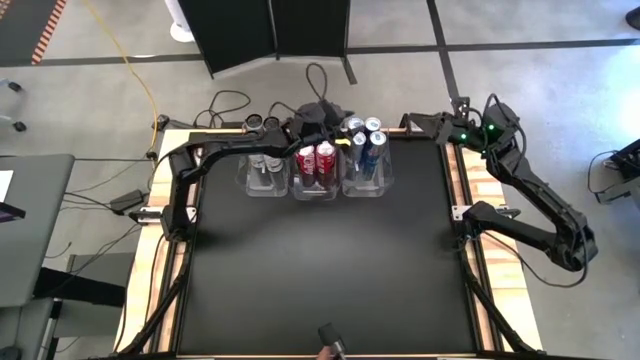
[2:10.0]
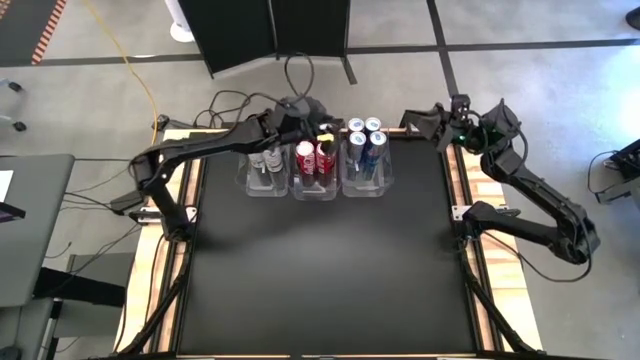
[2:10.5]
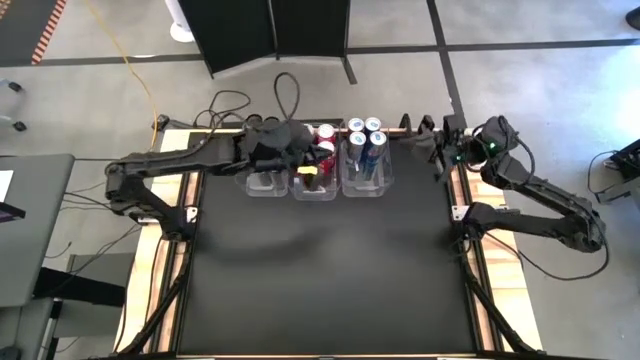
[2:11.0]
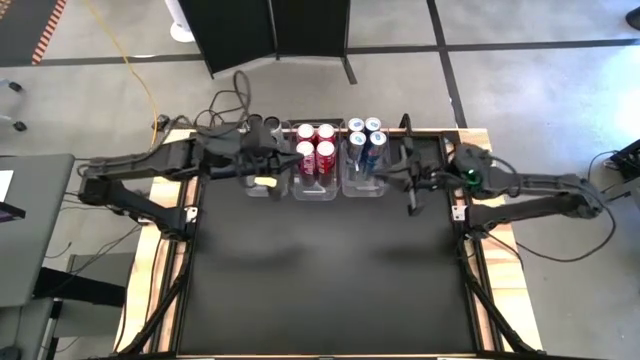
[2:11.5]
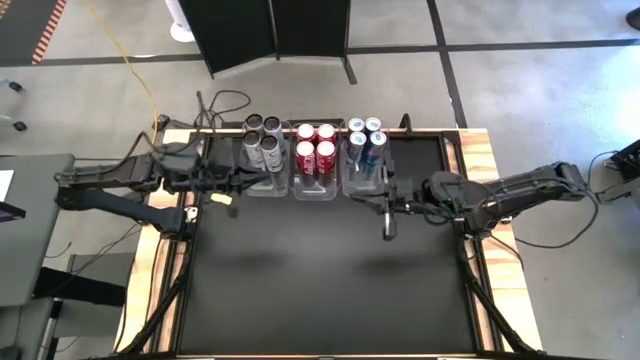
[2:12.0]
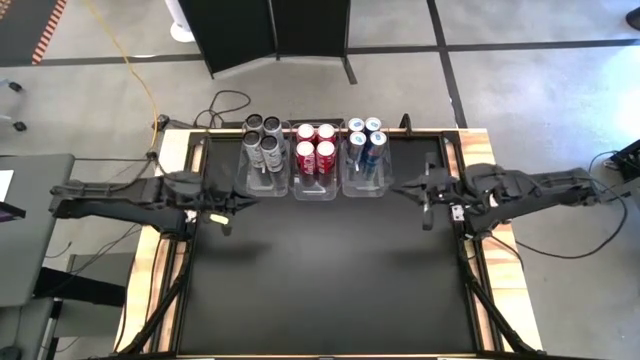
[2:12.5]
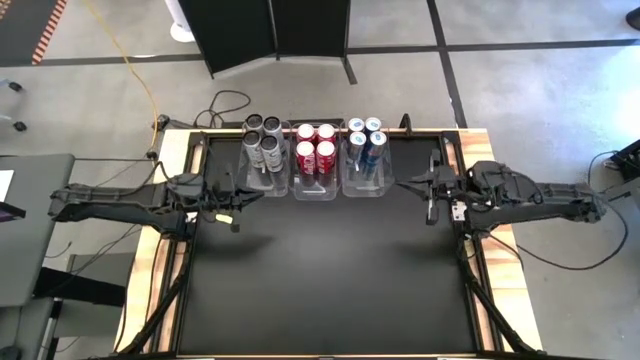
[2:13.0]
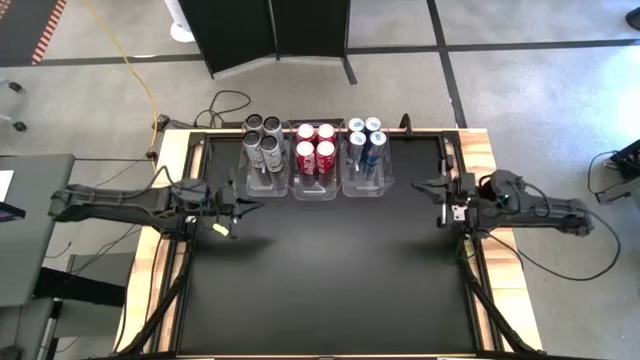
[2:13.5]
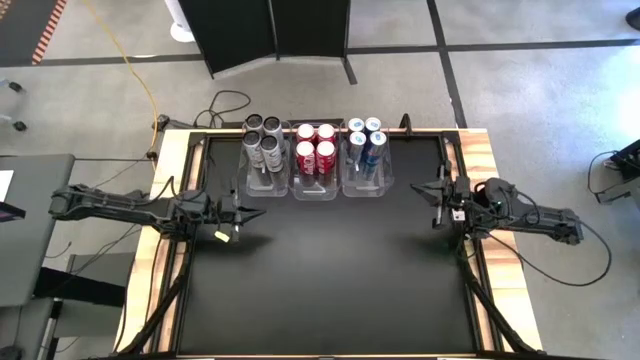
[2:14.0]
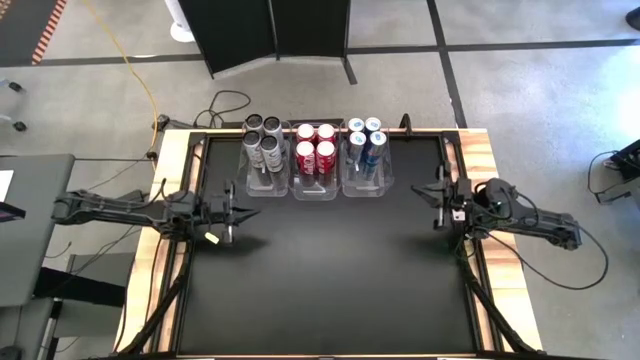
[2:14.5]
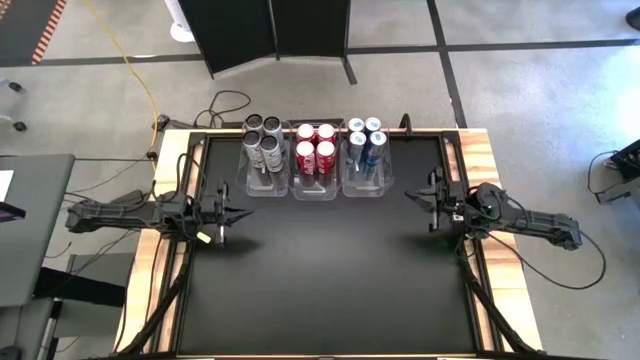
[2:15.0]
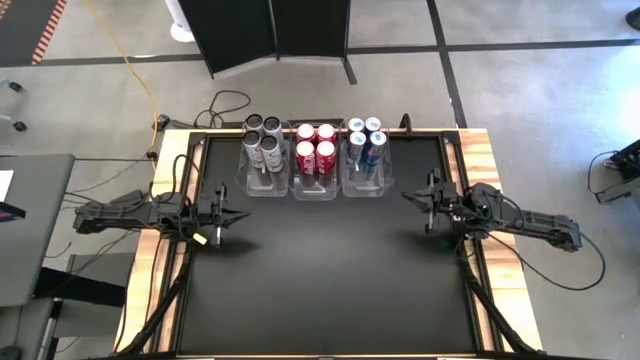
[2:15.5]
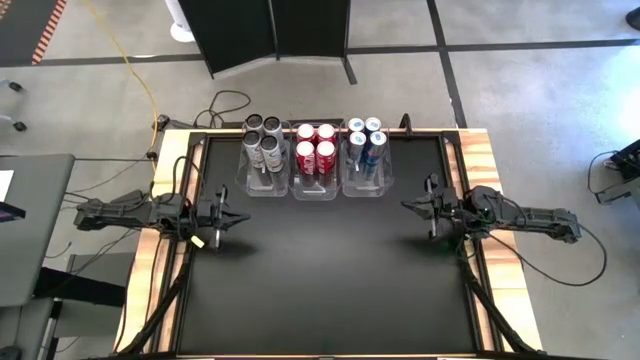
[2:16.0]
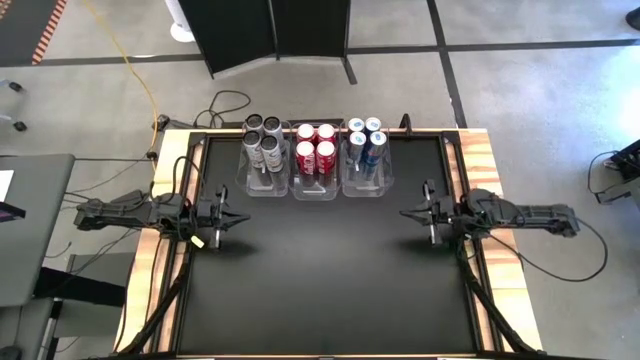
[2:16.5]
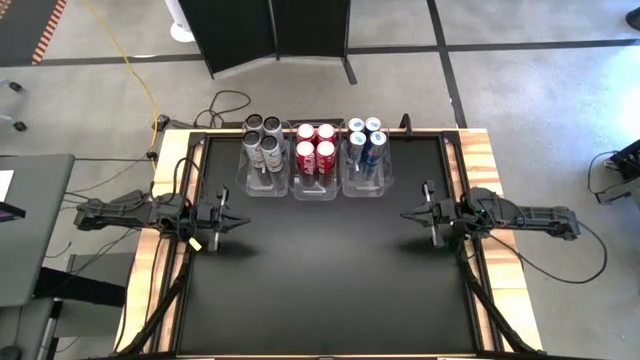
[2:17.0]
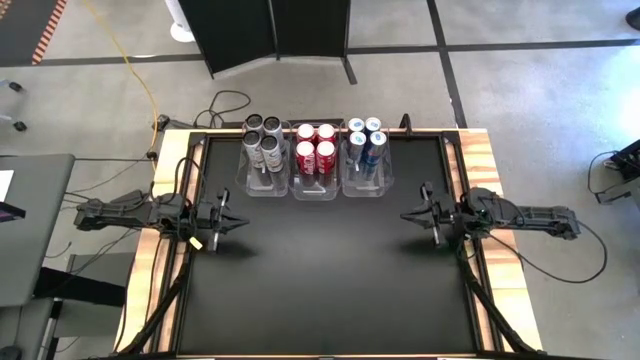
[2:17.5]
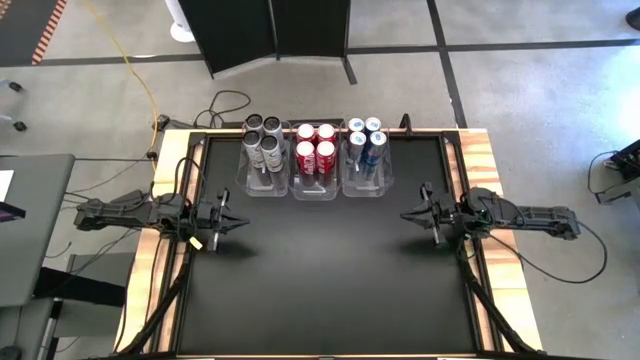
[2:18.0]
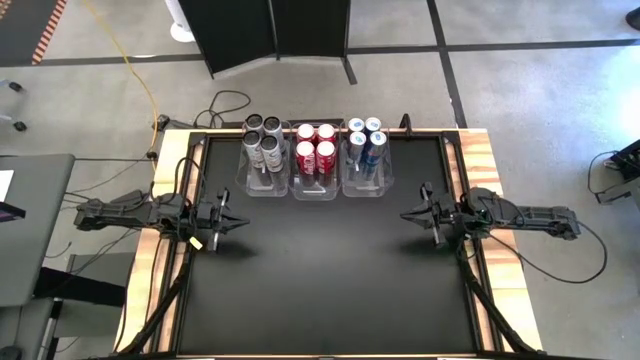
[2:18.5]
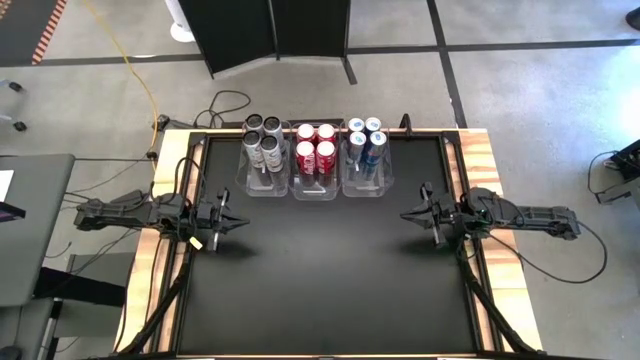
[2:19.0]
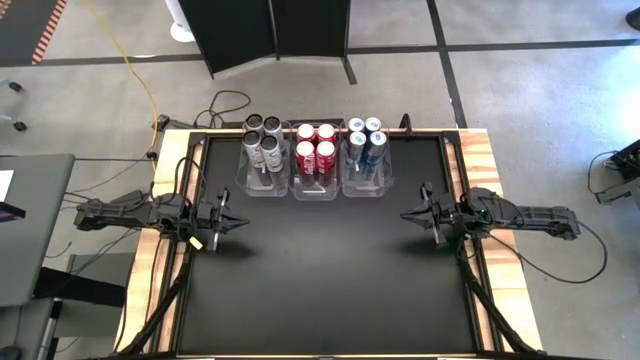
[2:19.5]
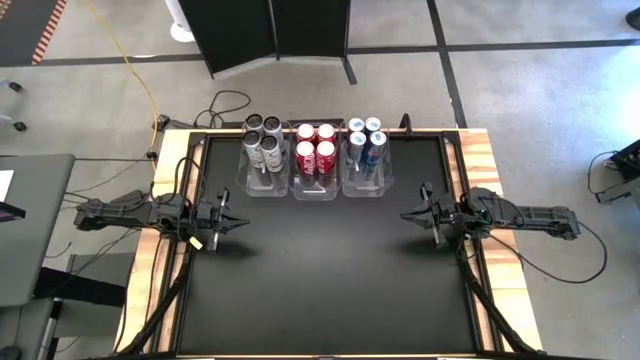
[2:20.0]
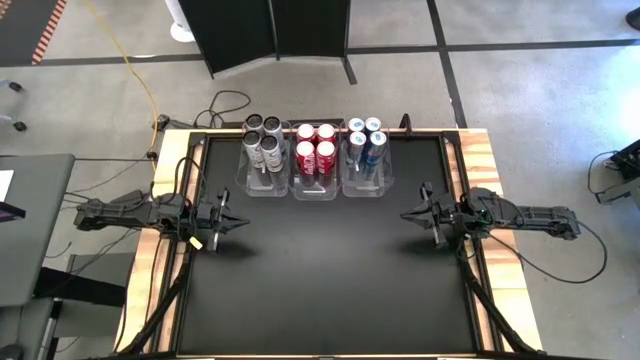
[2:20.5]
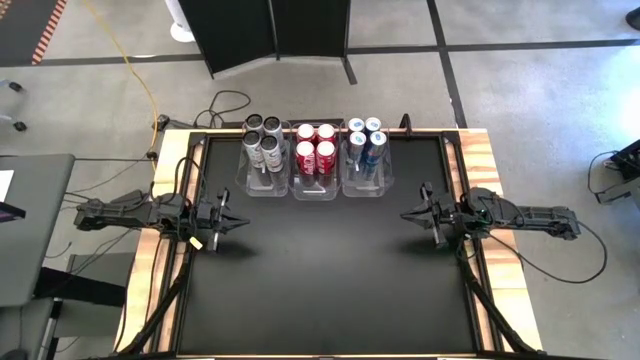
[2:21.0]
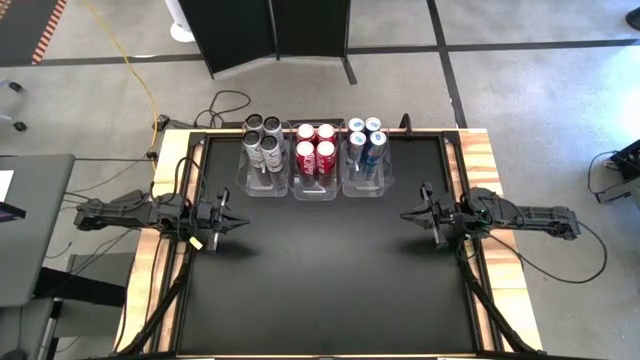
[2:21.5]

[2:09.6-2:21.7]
Task: Sort soda cans
Return to Home Position

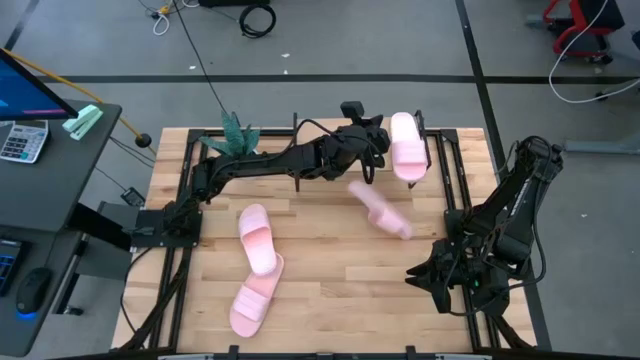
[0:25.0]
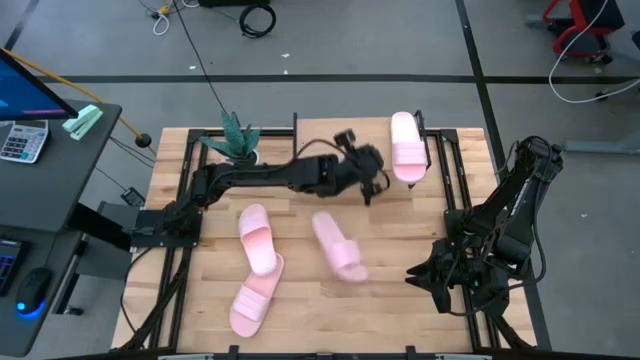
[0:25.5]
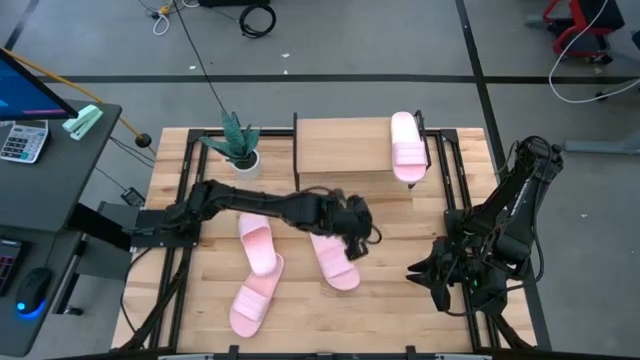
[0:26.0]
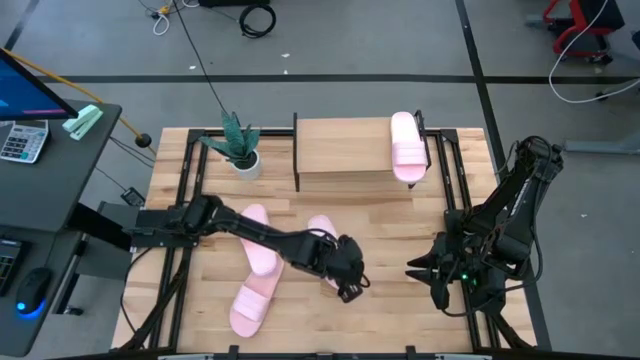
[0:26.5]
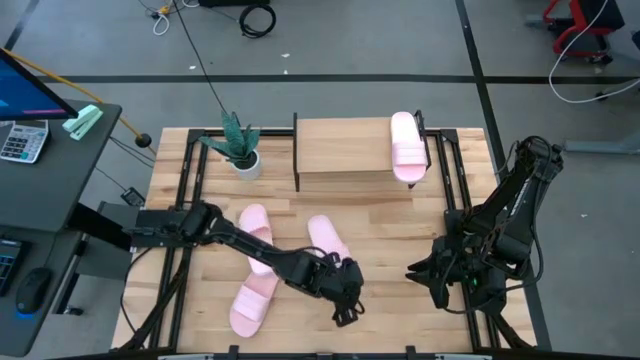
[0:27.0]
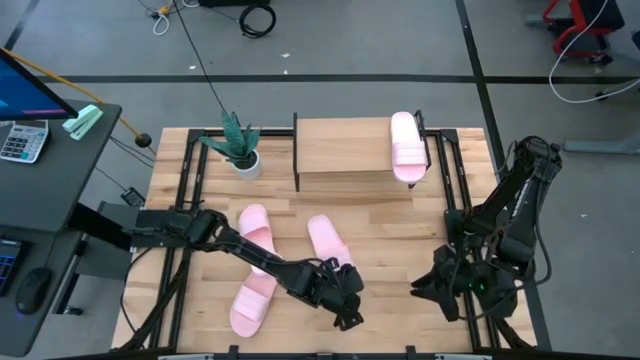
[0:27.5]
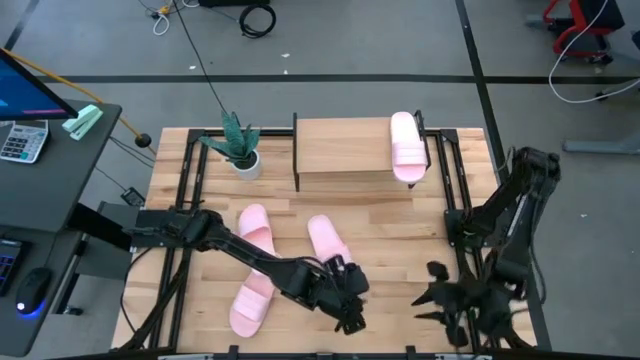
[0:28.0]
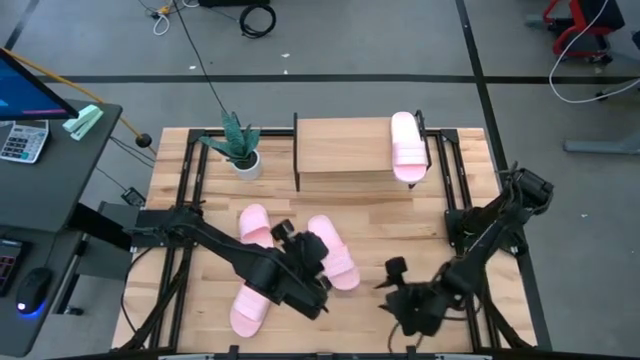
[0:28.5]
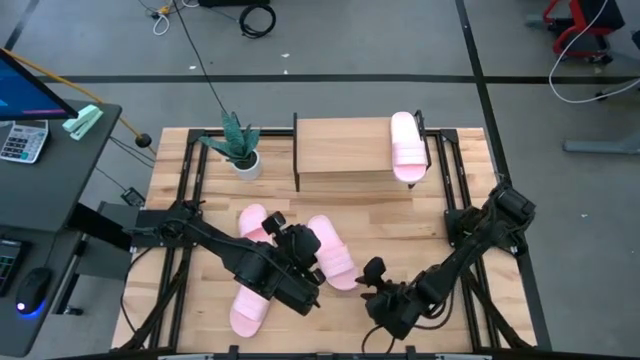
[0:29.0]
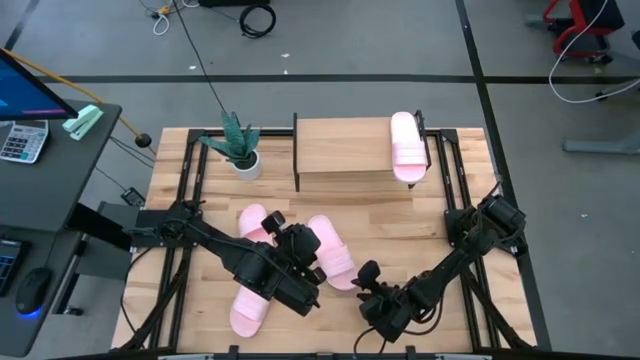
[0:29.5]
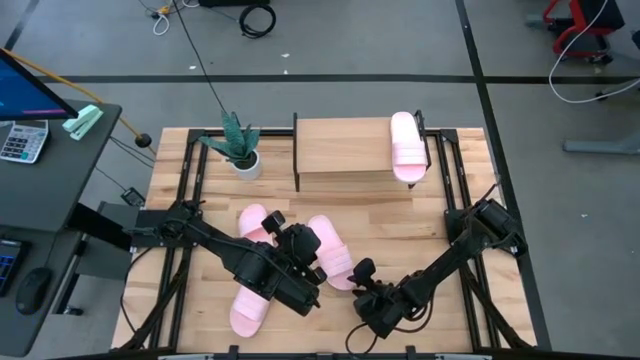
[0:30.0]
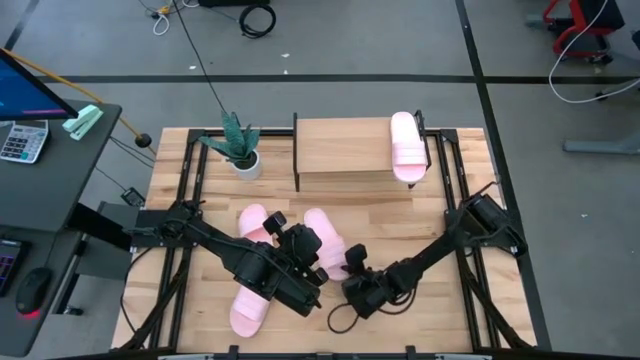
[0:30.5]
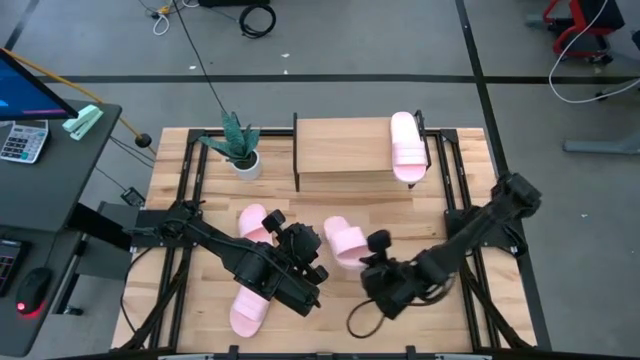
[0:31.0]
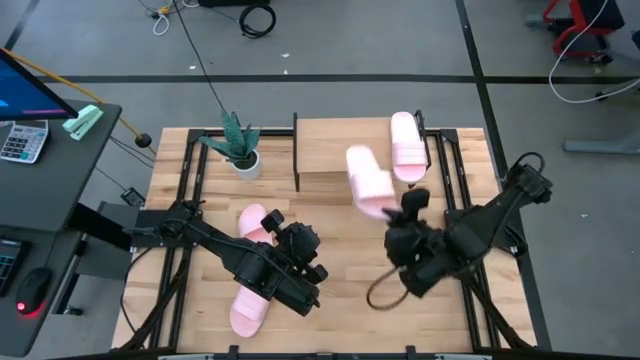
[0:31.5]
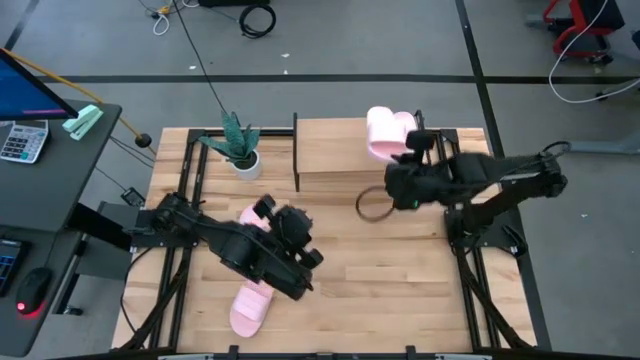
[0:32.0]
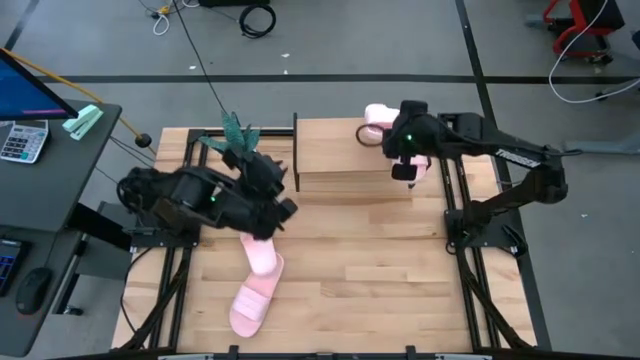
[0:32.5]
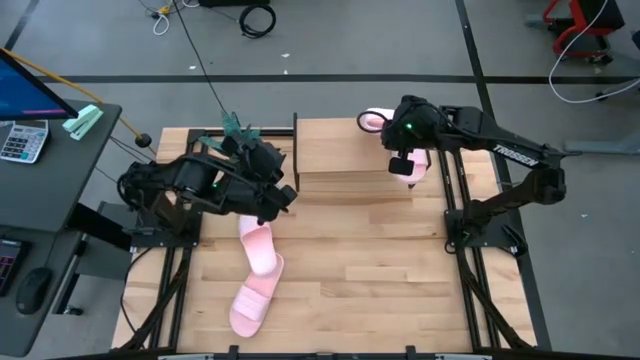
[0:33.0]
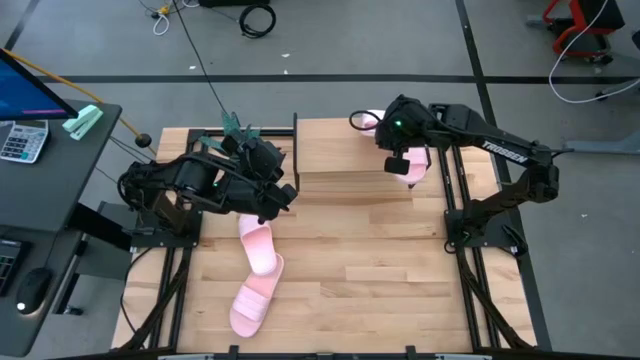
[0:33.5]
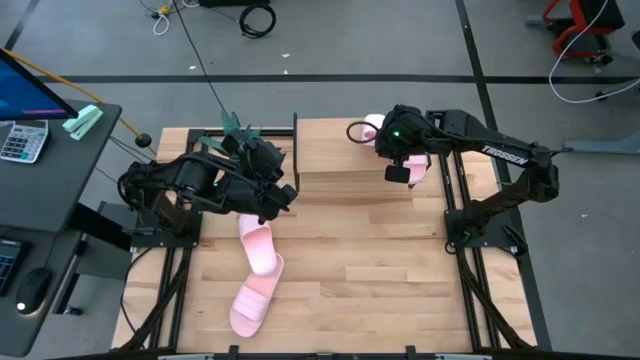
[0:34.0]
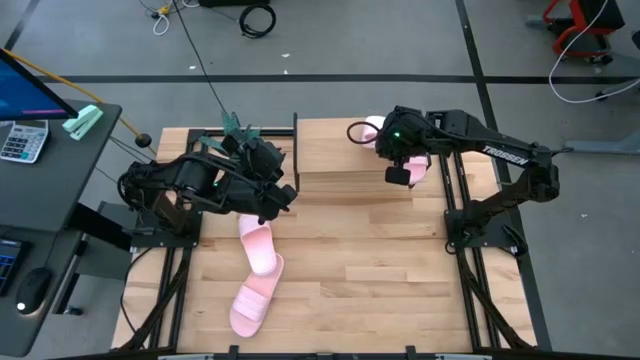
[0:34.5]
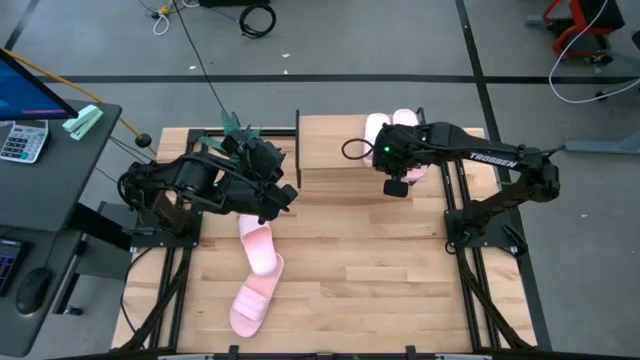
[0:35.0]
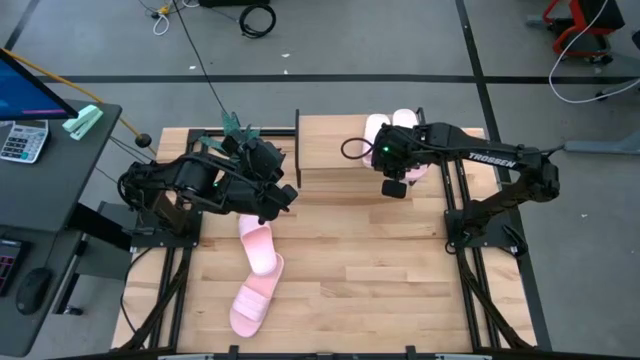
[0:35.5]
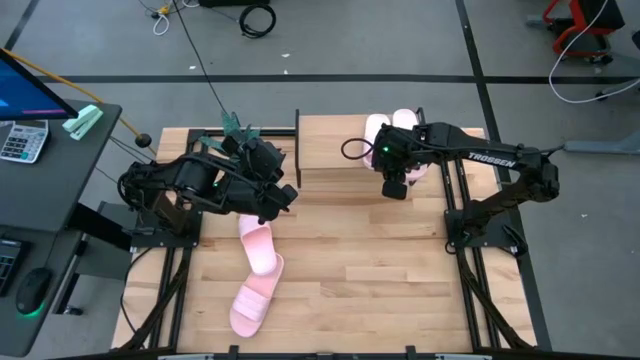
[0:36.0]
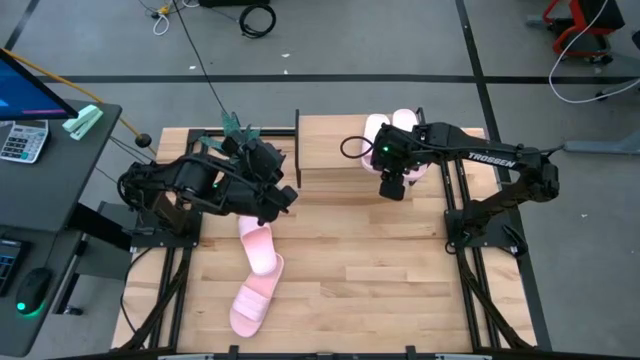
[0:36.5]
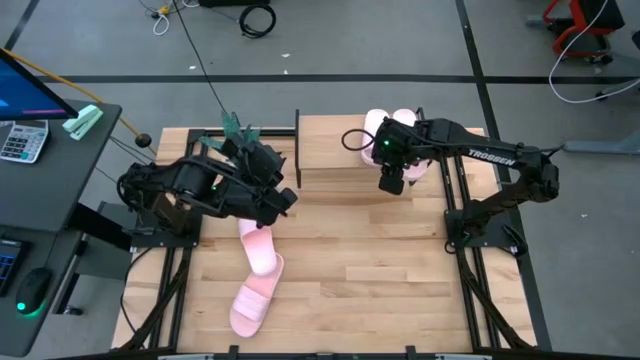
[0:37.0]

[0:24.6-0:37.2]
Task: Pick and place slides into the shelf
Put the pink slipper on the shelf
